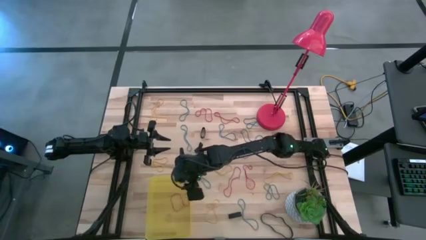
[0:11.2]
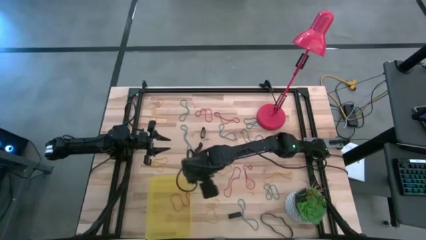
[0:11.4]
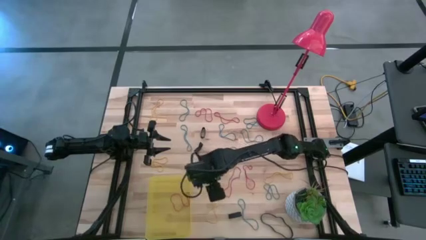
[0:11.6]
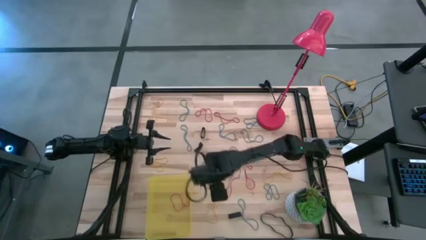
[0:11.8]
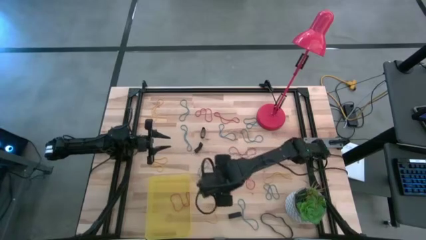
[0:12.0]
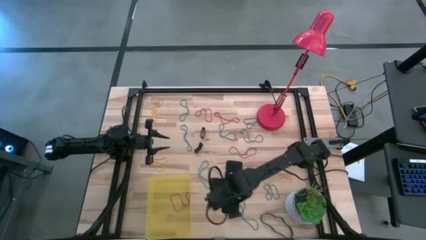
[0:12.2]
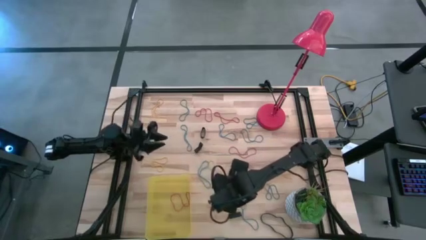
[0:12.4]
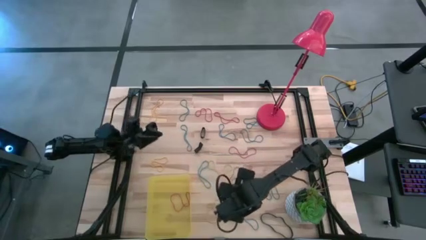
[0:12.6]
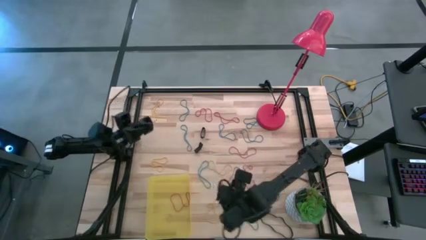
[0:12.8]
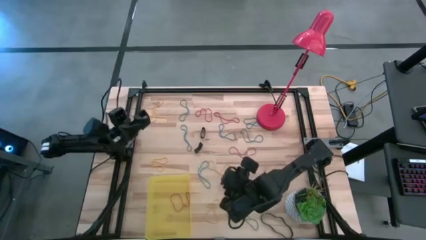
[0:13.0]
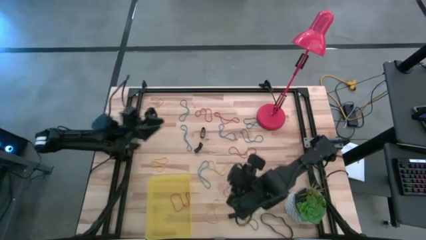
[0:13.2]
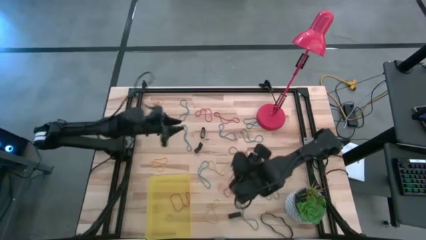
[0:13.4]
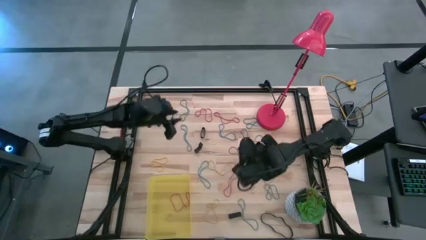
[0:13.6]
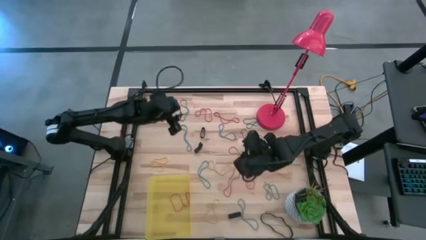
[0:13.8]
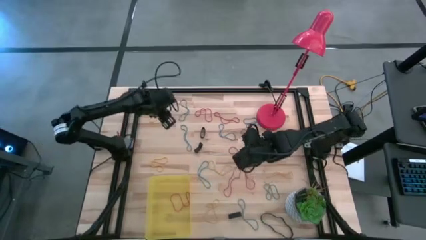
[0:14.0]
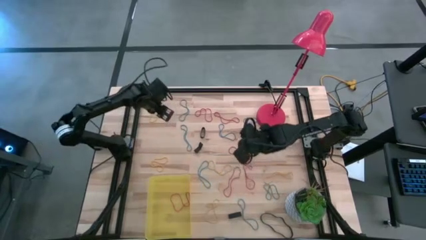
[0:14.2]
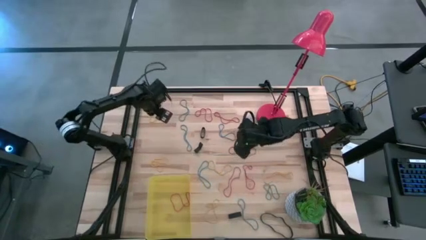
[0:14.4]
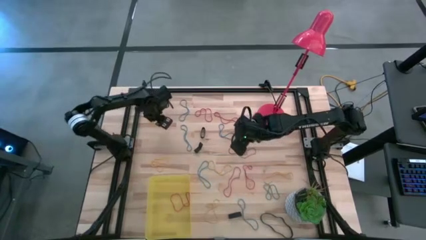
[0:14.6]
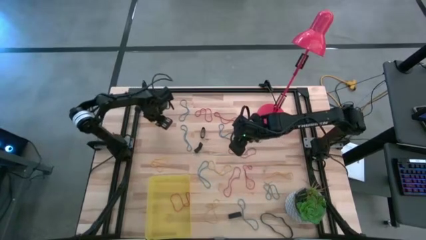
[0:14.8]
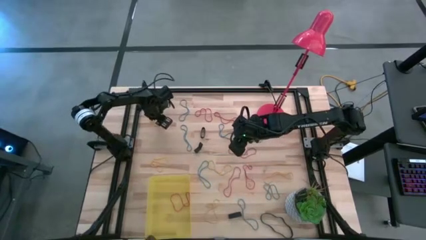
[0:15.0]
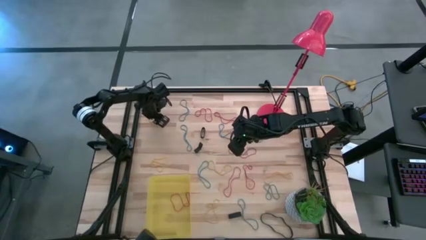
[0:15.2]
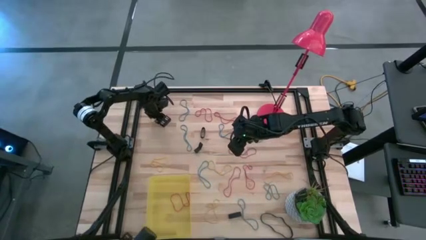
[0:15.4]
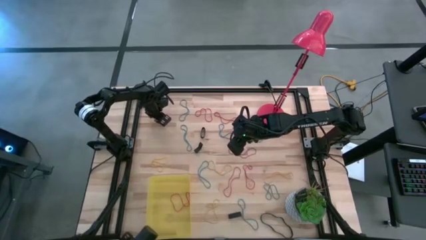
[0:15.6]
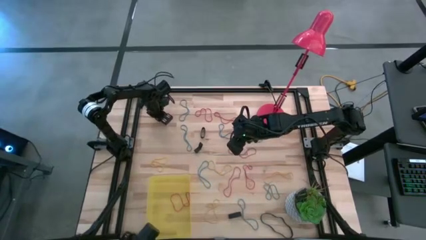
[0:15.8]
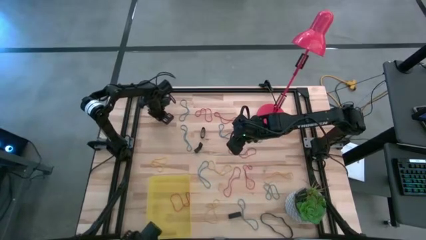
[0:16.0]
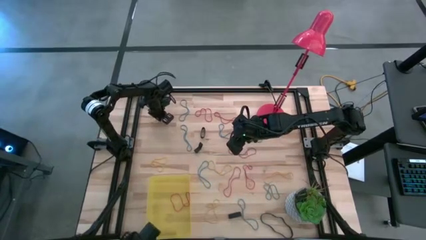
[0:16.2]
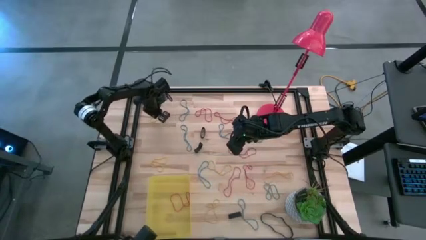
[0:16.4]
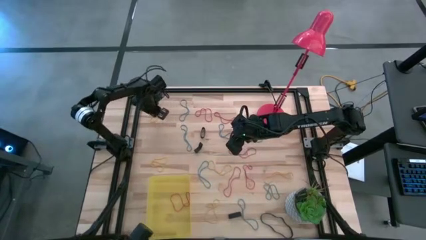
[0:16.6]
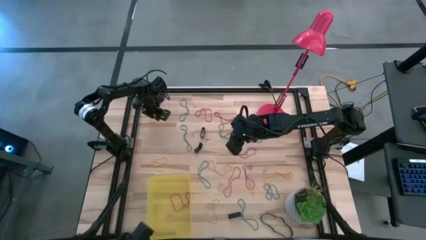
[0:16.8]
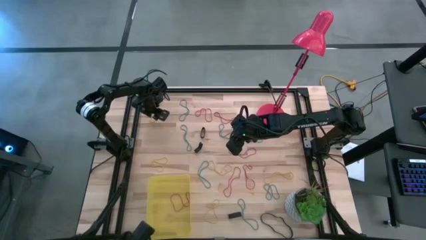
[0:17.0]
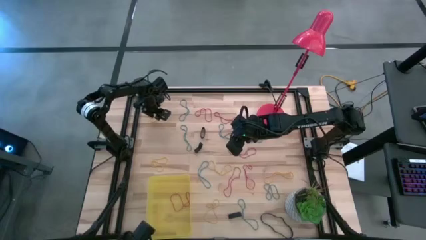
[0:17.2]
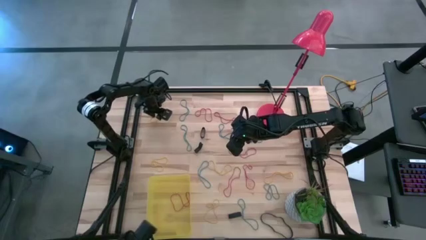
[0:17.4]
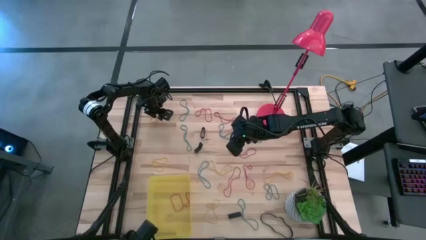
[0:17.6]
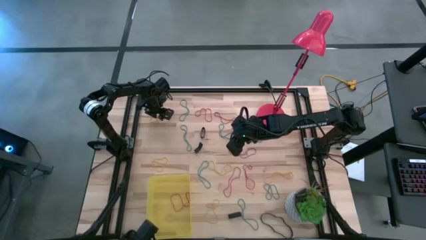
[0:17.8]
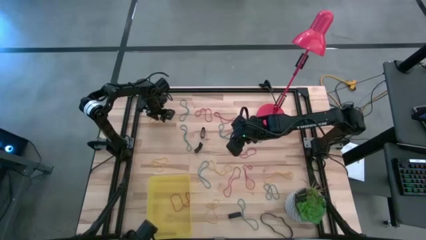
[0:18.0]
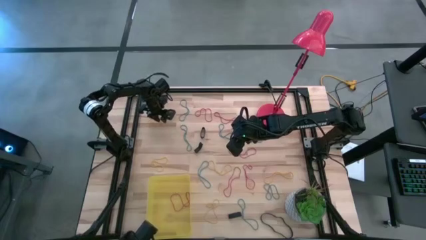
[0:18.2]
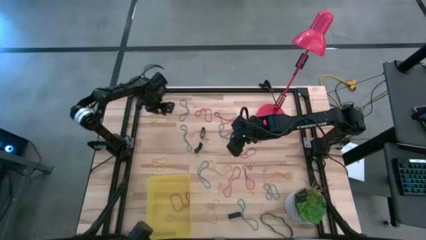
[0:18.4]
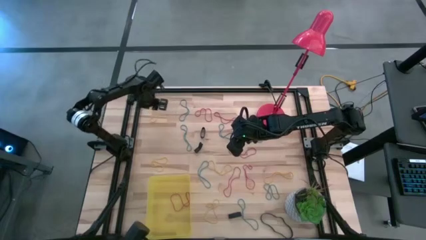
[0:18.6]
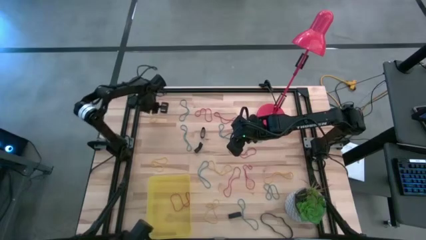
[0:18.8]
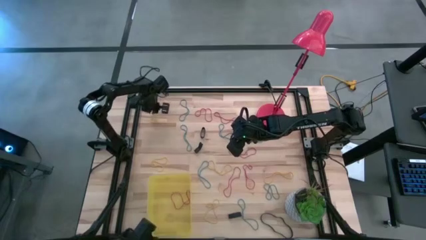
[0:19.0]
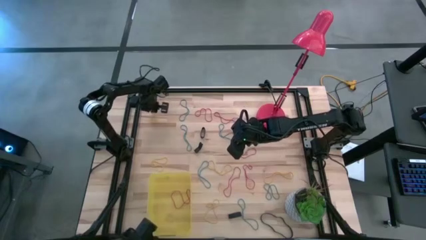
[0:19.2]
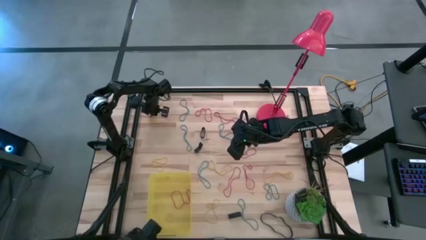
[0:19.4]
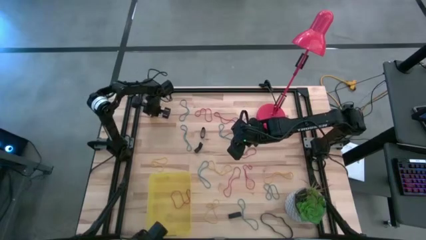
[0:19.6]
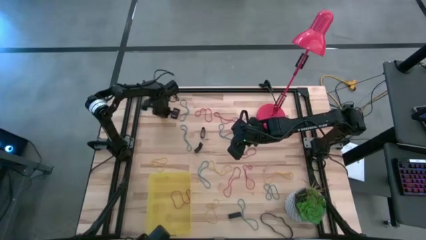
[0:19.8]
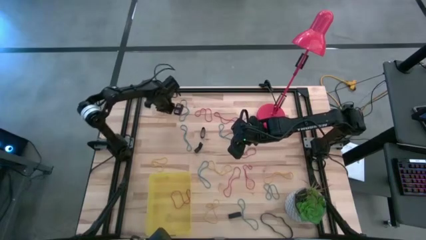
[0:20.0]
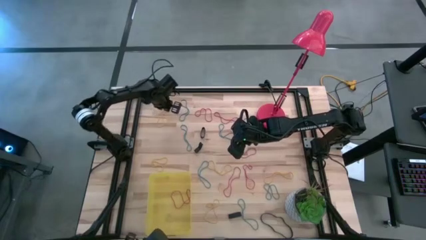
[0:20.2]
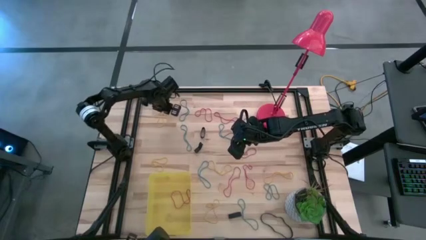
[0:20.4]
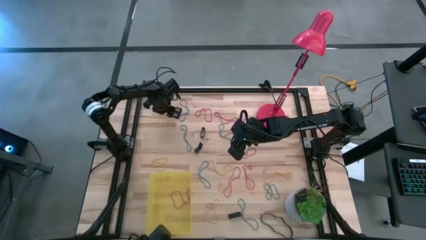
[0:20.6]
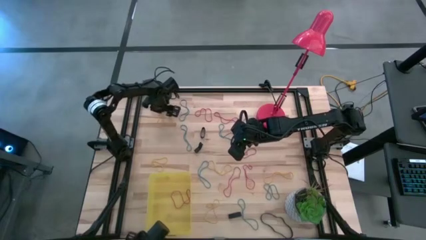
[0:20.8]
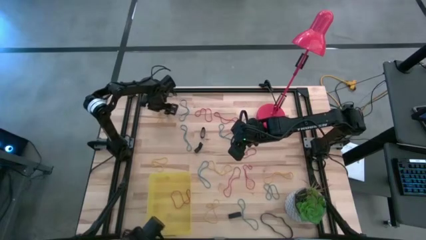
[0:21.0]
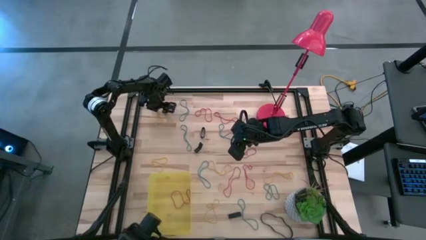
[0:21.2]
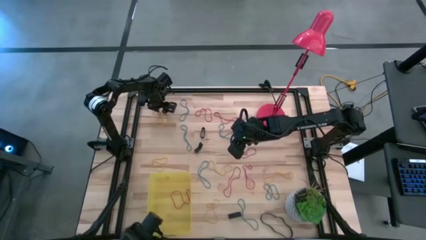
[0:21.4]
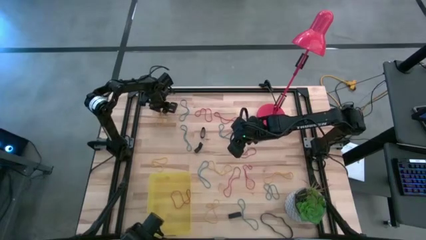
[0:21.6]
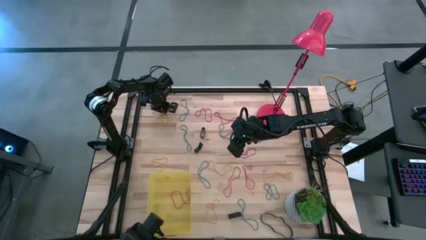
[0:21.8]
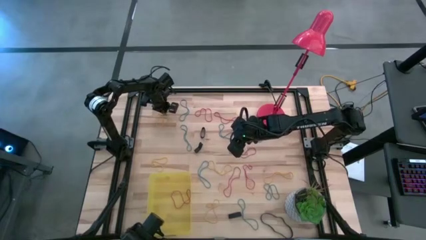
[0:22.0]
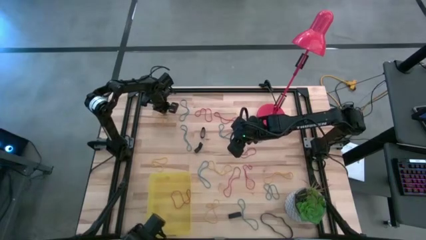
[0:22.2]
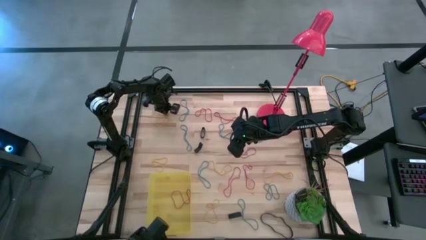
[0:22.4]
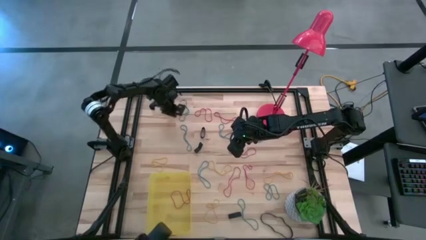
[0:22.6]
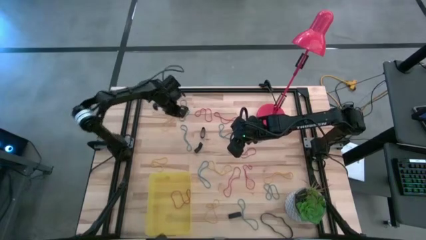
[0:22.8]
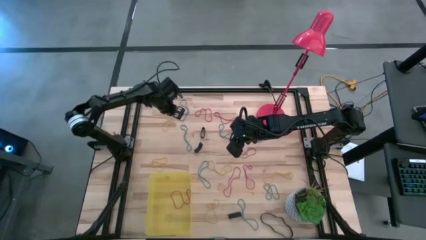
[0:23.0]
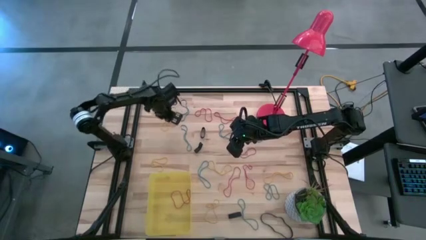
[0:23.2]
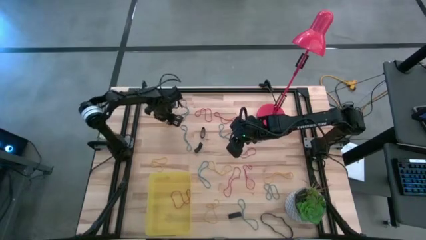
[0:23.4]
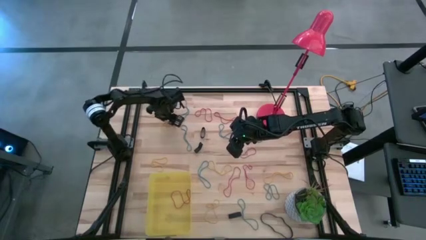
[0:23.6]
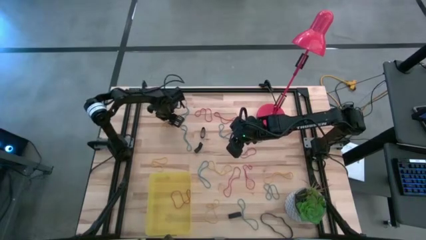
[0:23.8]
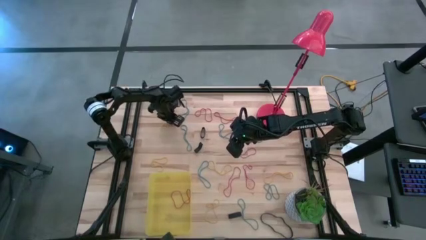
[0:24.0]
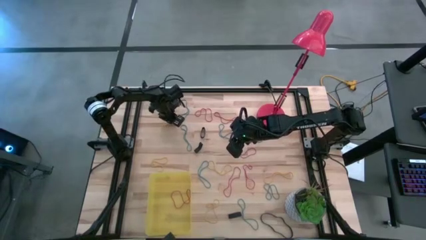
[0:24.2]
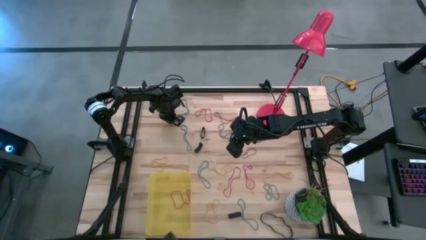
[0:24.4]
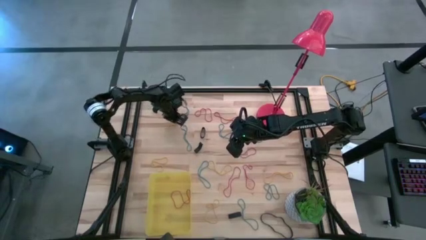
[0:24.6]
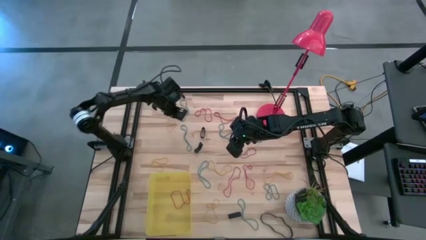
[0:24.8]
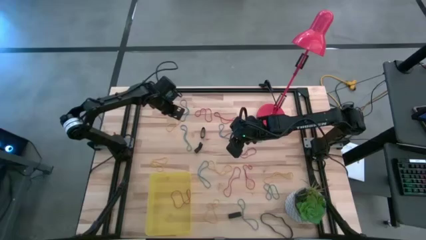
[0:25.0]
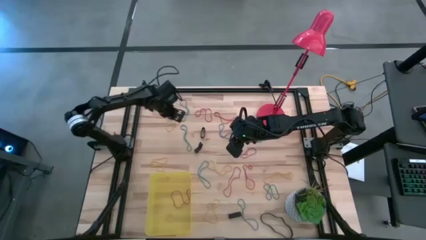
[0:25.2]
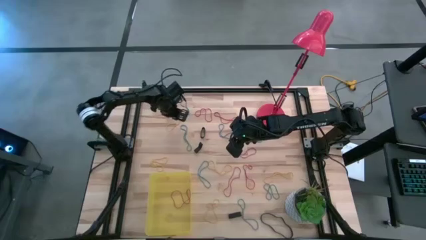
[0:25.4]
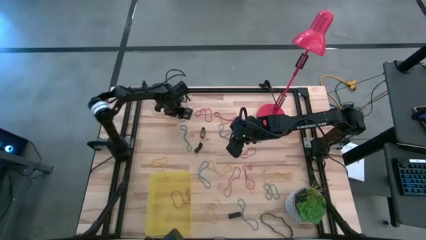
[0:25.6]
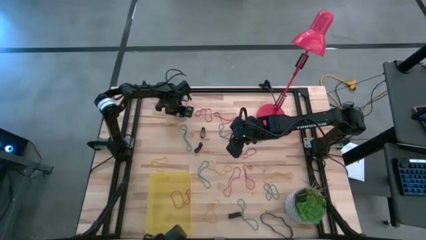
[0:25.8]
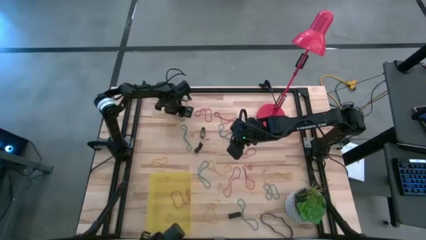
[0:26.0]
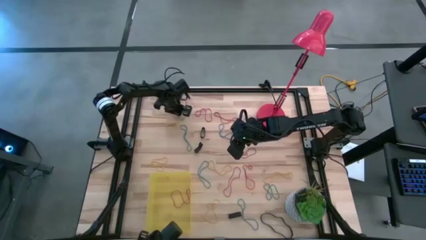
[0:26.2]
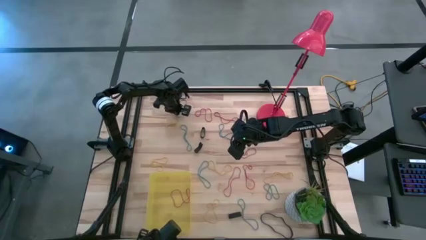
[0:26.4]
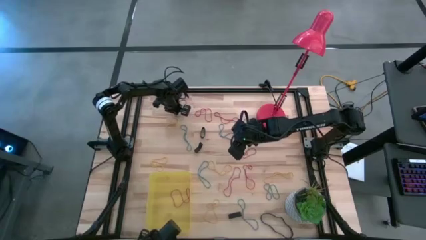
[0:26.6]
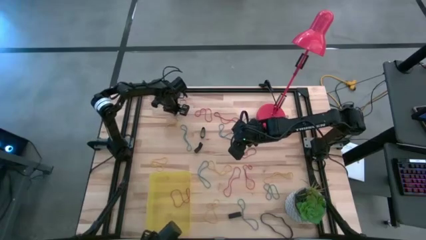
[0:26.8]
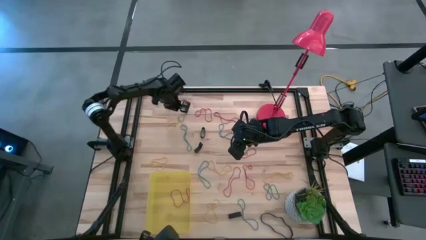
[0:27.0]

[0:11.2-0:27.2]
Task: Pick and place rubber bands into bin
Put the yellow rubber band into the bin
